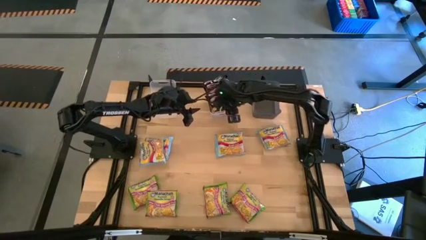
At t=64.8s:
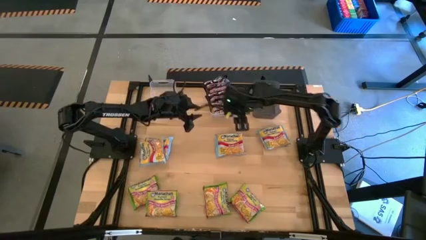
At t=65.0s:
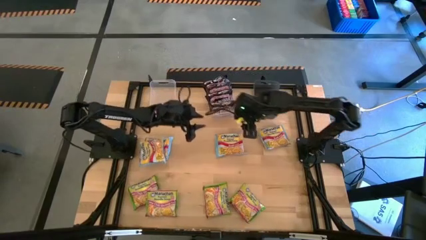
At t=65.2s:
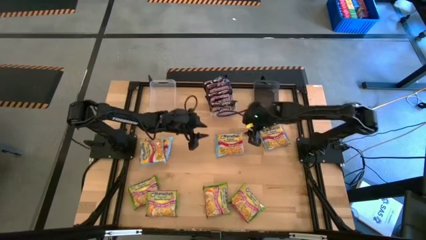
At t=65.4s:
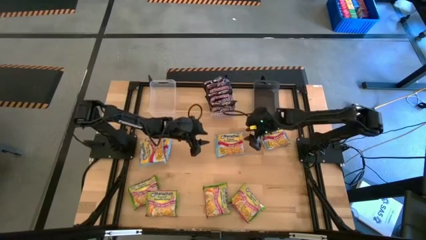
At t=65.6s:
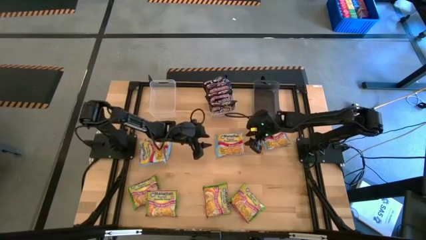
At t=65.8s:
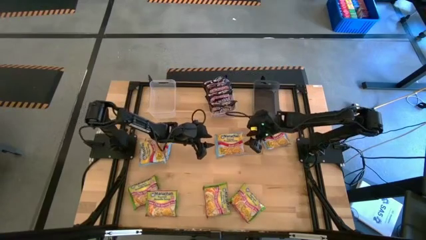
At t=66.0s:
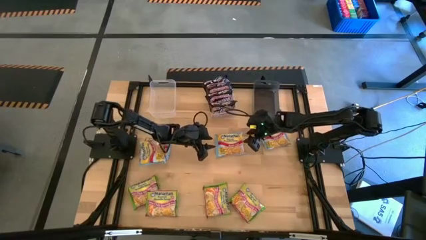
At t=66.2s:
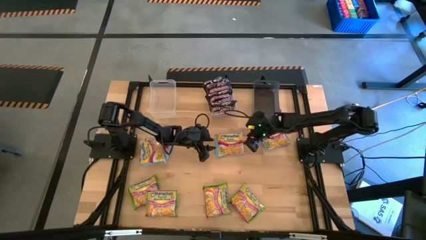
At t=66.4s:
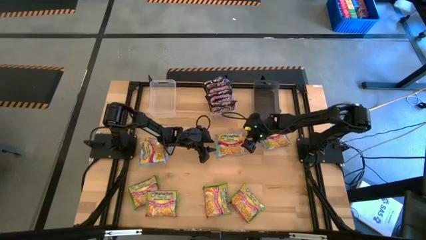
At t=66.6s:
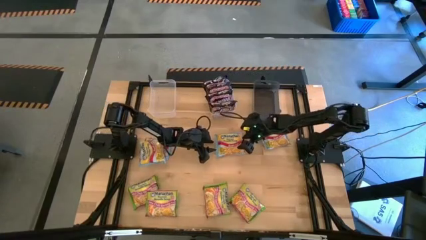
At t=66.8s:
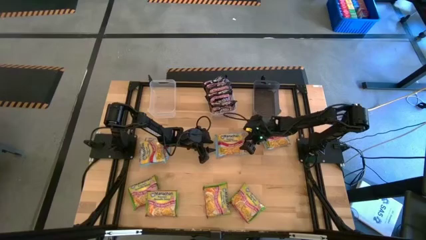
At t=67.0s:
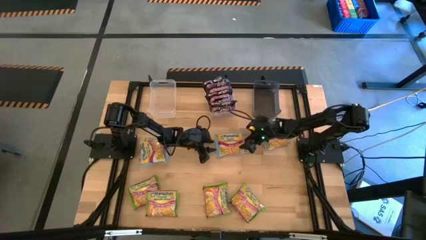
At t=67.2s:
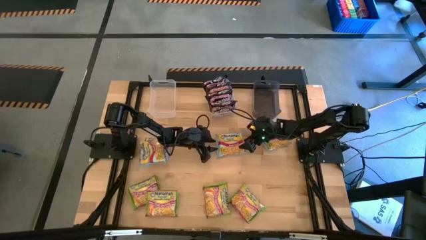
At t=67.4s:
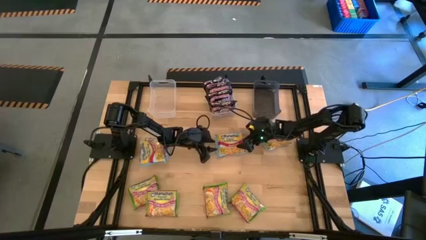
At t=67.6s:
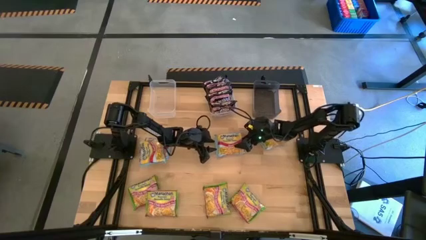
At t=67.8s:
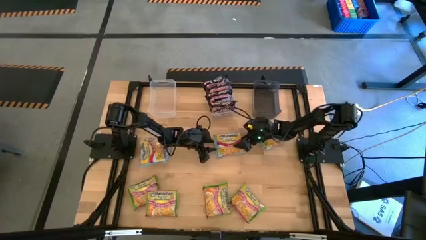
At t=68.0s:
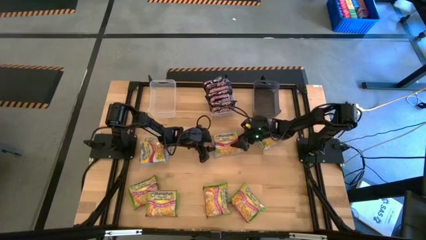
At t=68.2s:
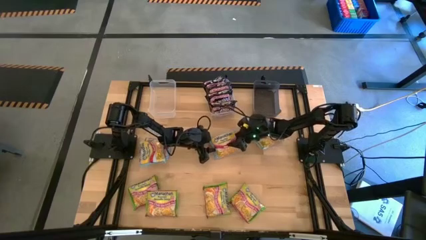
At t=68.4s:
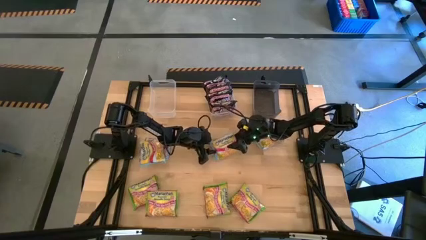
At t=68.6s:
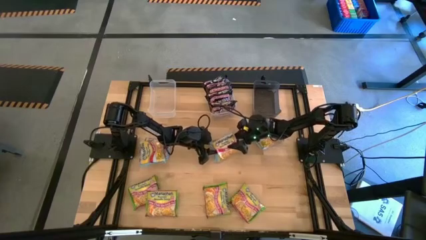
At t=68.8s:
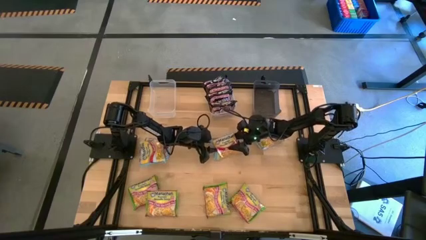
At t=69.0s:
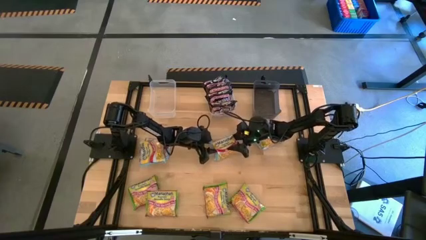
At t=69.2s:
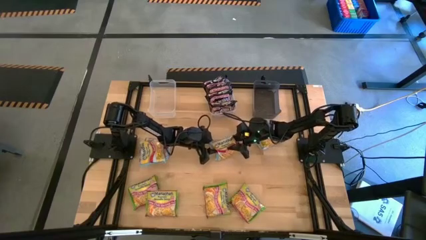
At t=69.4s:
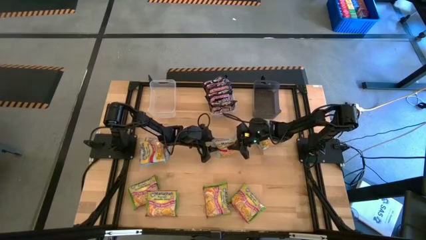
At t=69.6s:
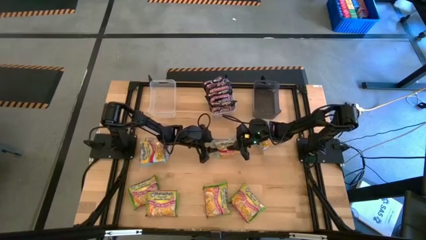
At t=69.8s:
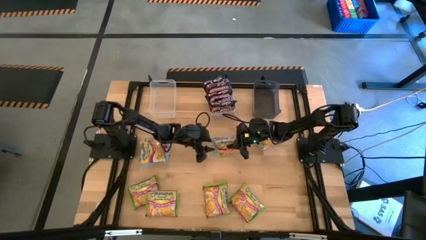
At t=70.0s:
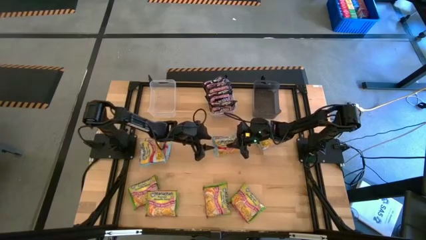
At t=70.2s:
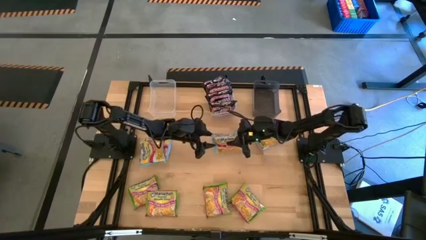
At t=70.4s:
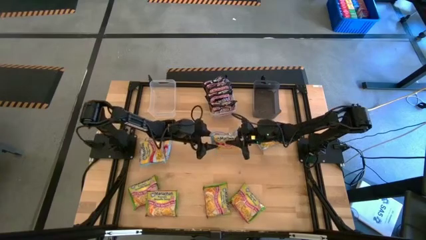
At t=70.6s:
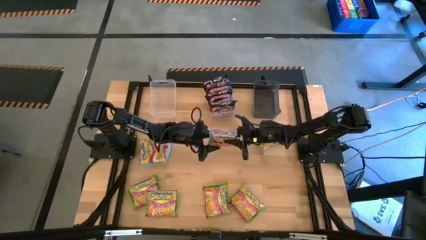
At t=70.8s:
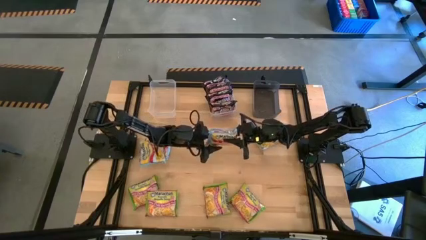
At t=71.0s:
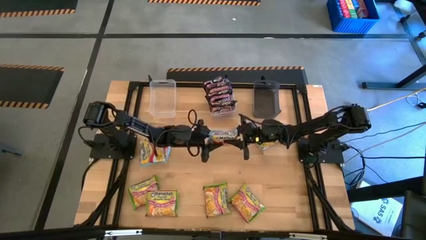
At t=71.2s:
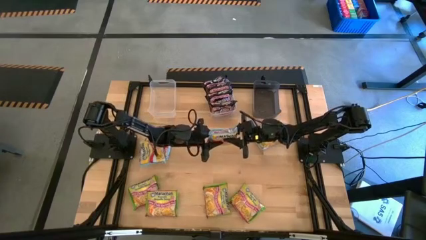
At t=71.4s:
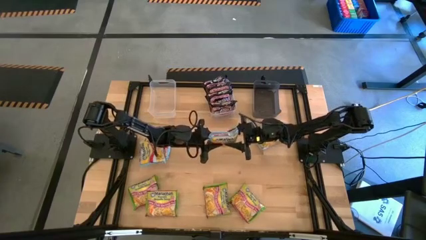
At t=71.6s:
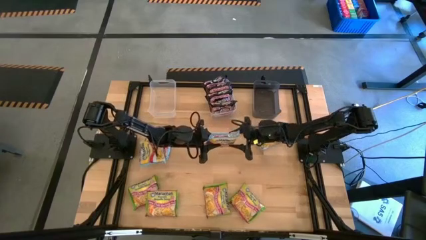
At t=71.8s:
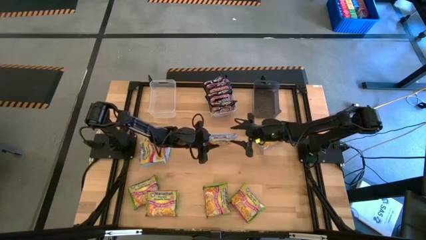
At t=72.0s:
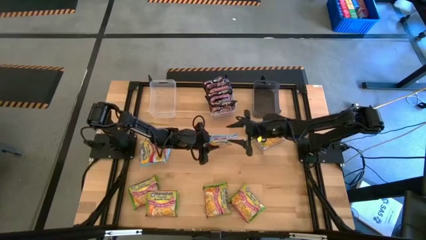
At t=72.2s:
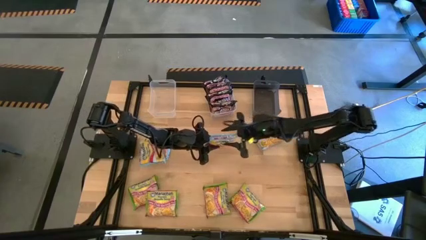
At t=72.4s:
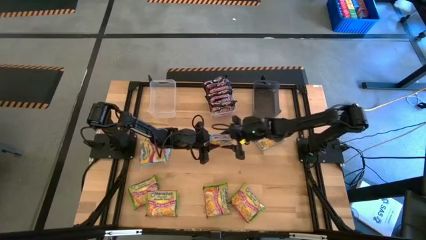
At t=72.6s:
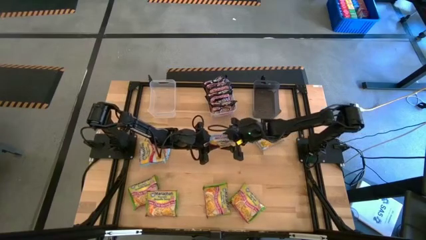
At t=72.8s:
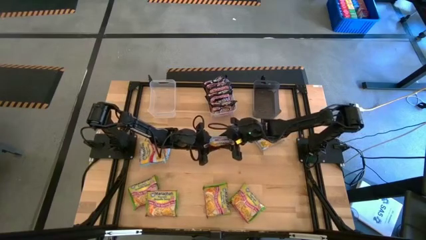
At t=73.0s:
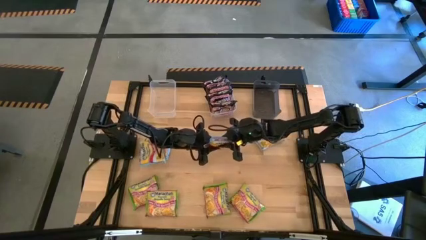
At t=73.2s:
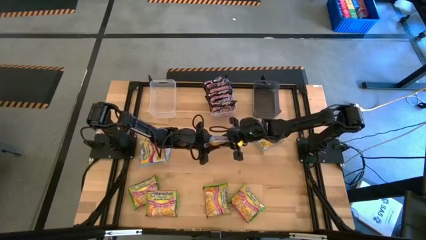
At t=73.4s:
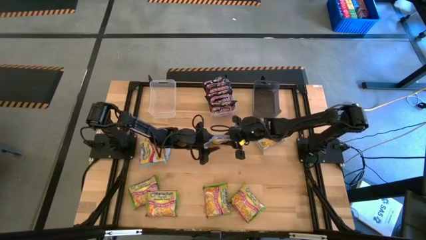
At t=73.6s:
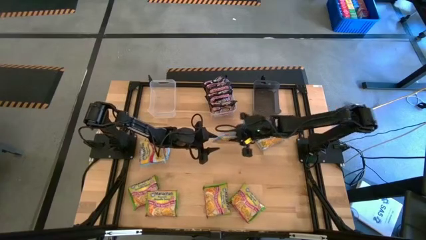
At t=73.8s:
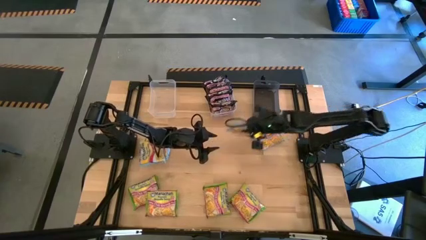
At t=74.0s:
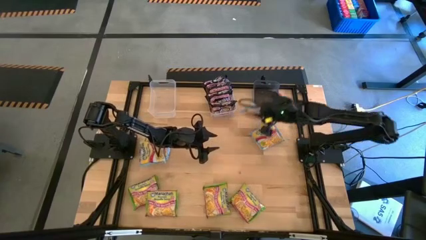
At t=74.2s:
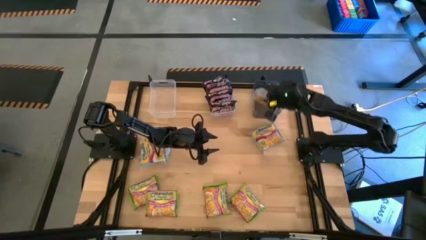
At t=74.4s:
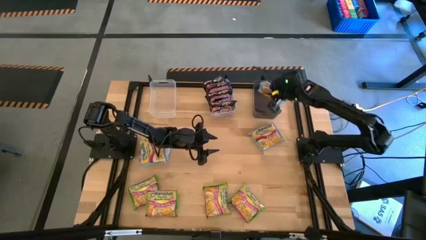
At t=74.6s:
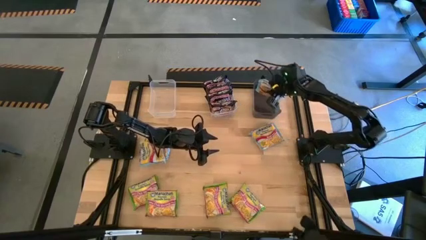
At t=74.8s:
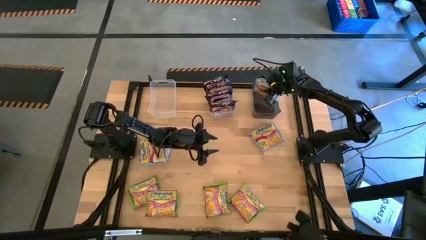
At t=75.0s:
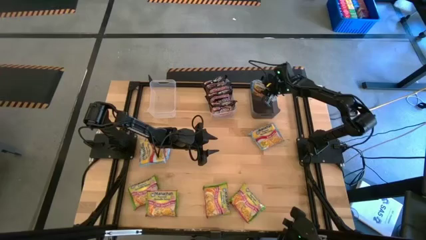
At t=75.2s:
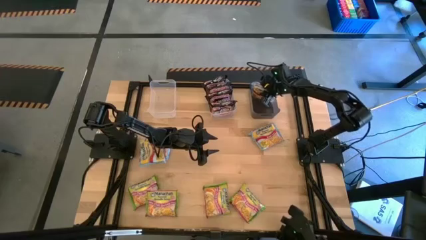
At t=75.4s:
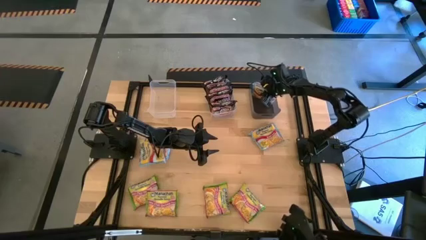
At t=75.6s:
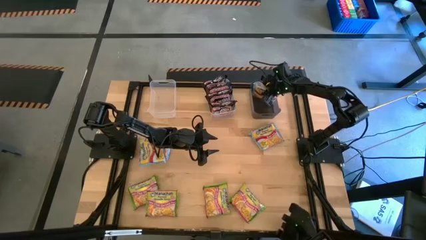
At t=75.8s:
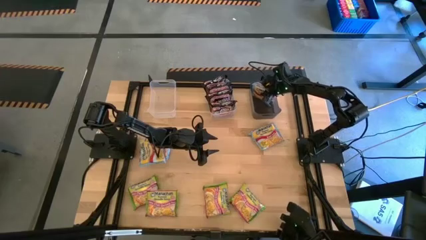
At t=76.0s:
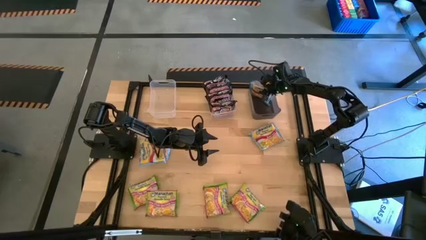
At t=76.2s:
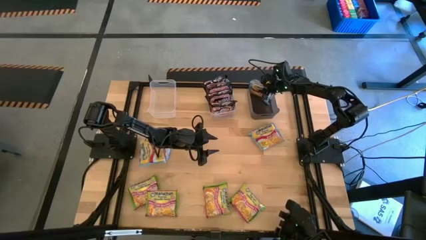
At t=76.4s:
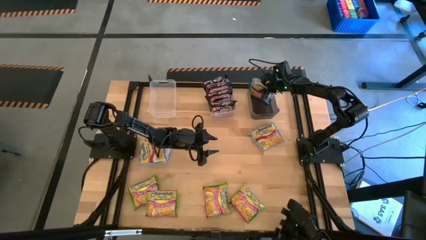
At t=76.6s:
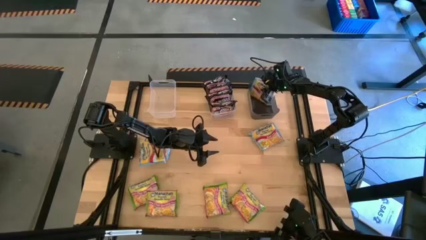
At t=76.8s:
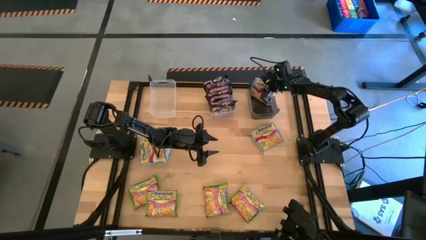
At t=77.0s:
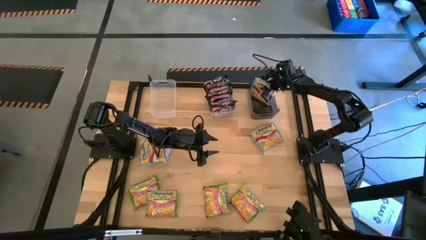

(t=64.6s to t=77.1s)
Task: Sort Maruchan noodles
Put the blue noodle pack into the black bin
